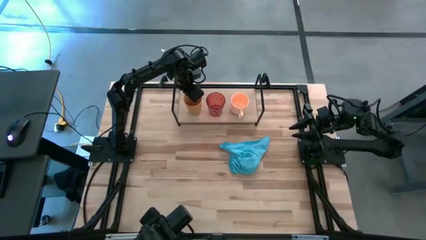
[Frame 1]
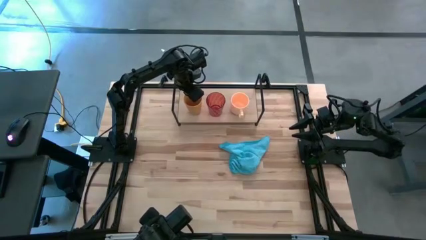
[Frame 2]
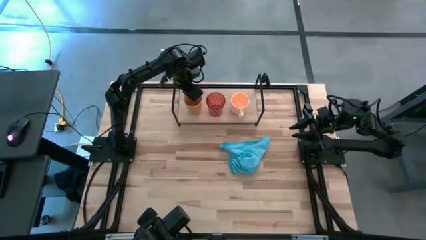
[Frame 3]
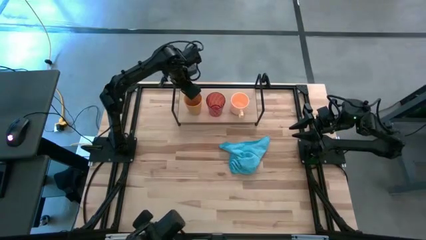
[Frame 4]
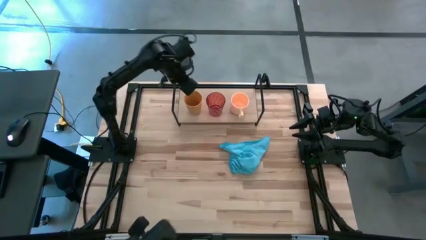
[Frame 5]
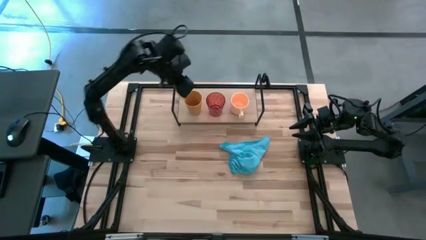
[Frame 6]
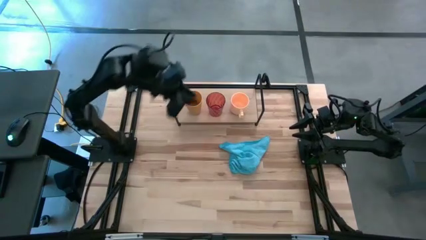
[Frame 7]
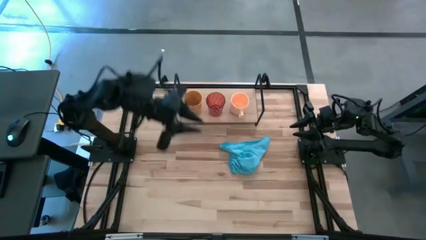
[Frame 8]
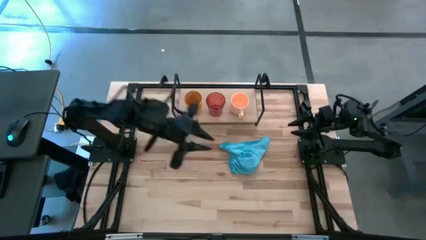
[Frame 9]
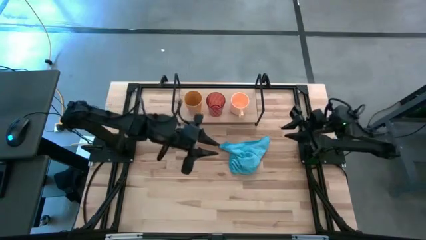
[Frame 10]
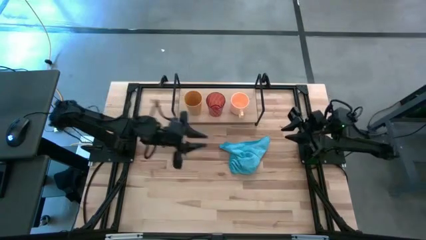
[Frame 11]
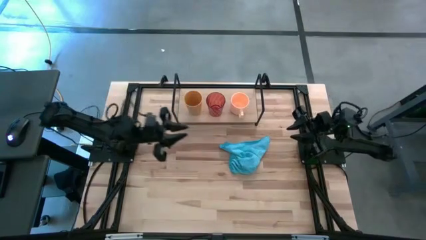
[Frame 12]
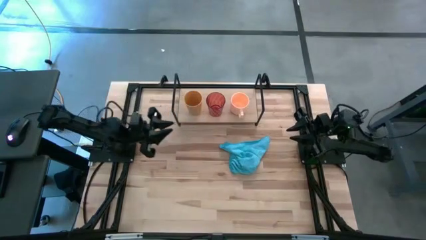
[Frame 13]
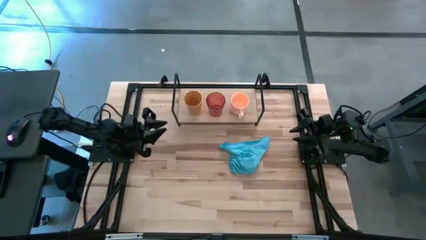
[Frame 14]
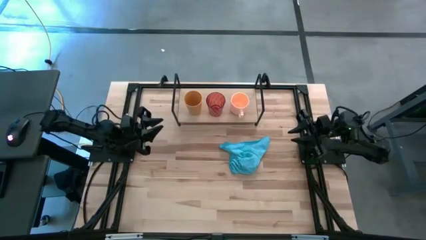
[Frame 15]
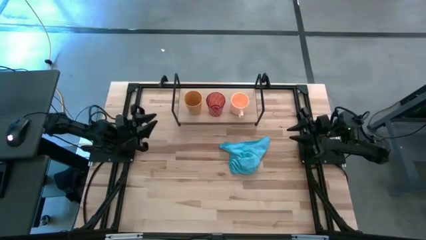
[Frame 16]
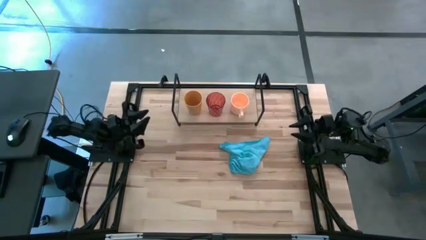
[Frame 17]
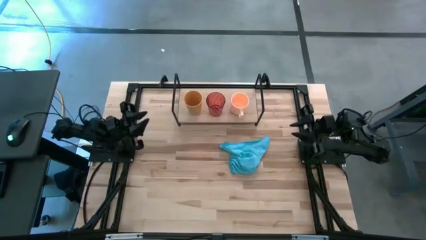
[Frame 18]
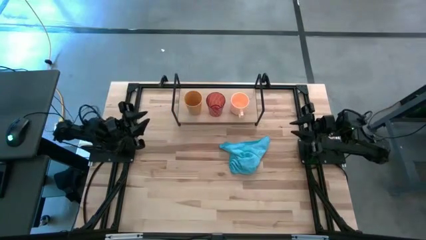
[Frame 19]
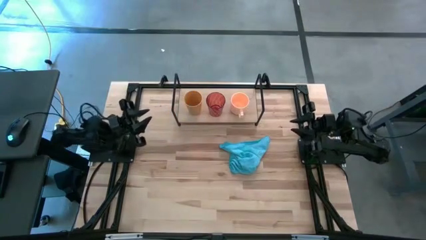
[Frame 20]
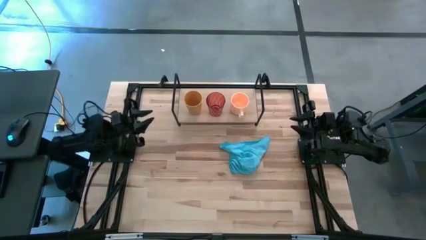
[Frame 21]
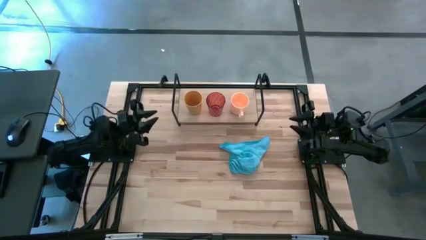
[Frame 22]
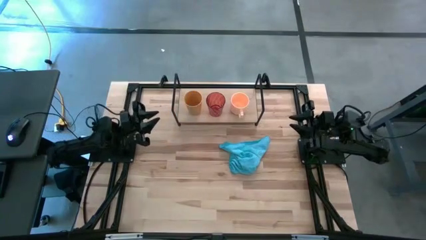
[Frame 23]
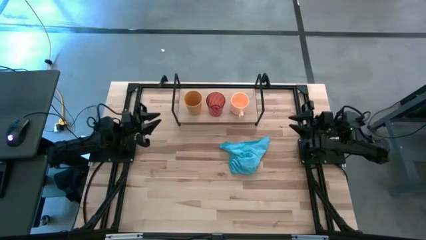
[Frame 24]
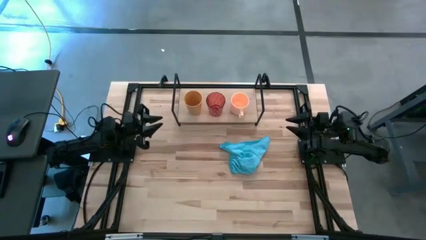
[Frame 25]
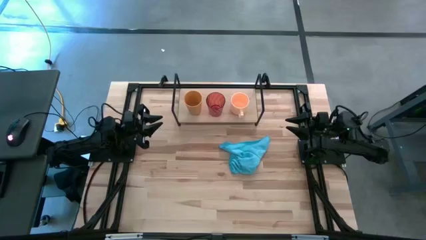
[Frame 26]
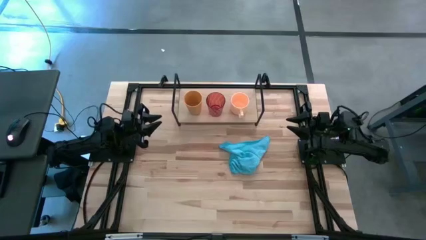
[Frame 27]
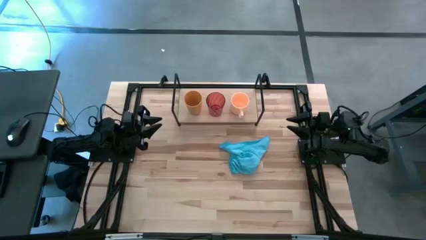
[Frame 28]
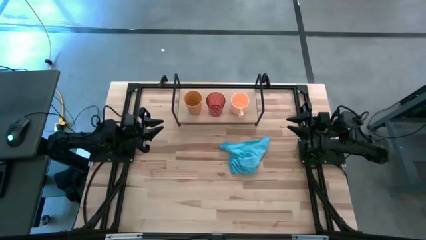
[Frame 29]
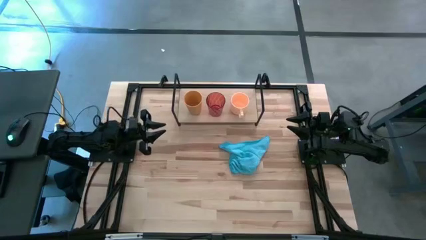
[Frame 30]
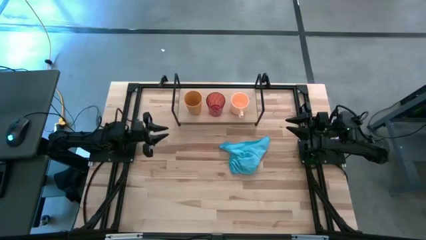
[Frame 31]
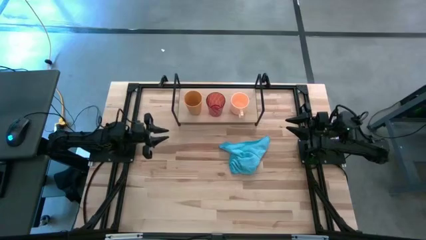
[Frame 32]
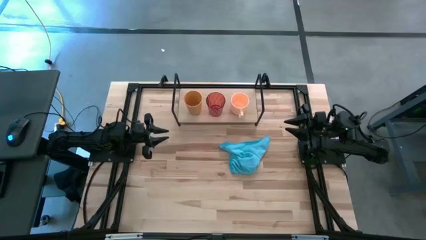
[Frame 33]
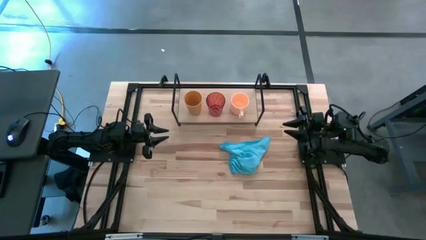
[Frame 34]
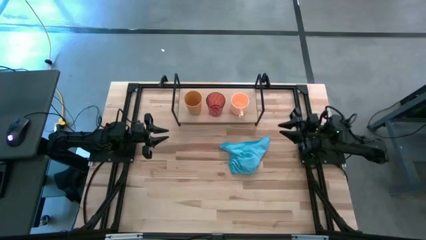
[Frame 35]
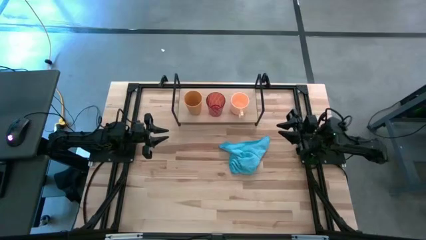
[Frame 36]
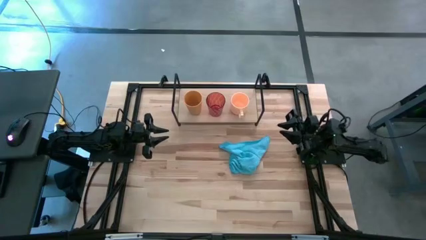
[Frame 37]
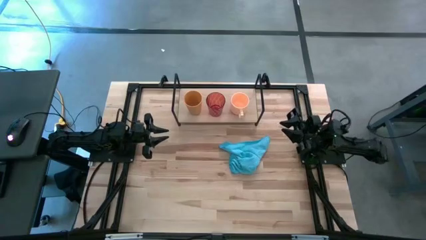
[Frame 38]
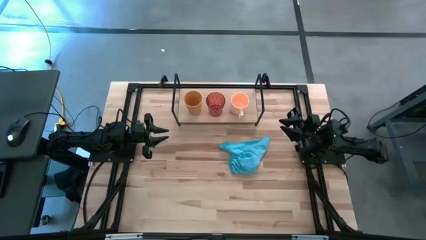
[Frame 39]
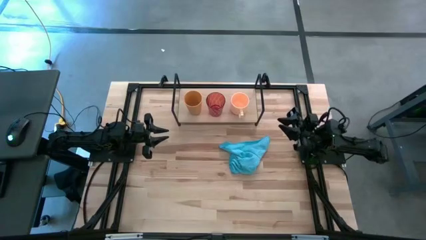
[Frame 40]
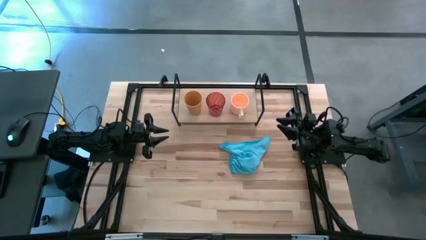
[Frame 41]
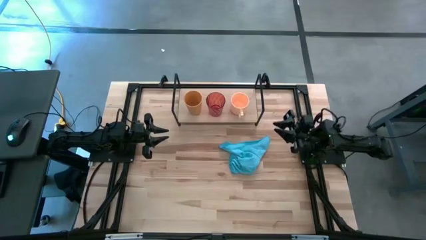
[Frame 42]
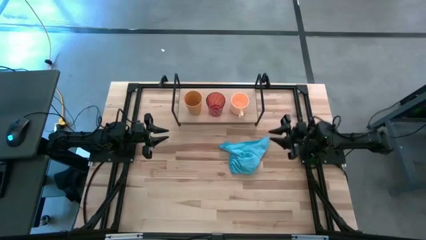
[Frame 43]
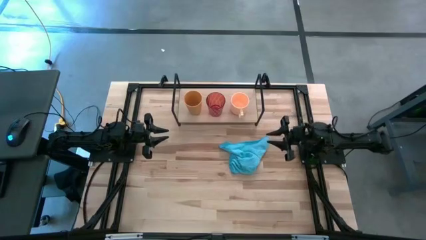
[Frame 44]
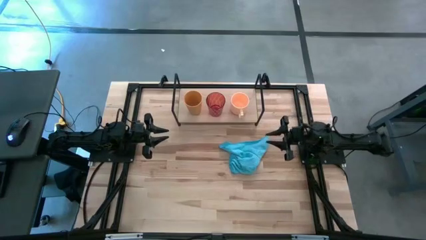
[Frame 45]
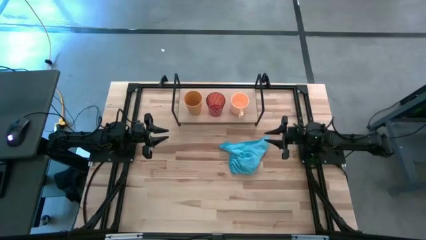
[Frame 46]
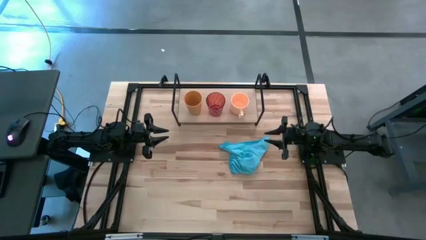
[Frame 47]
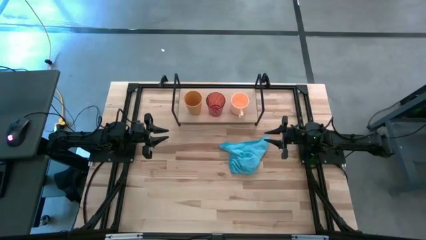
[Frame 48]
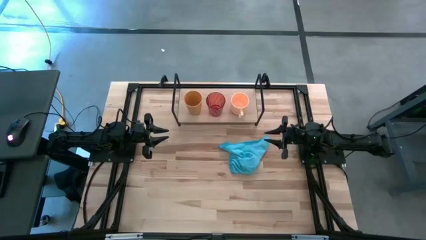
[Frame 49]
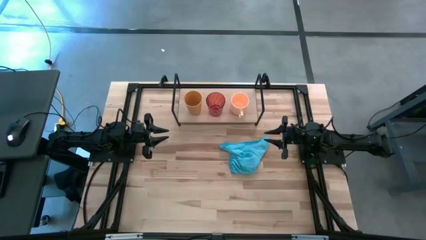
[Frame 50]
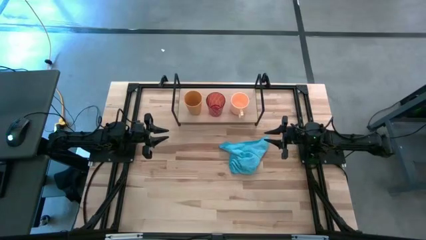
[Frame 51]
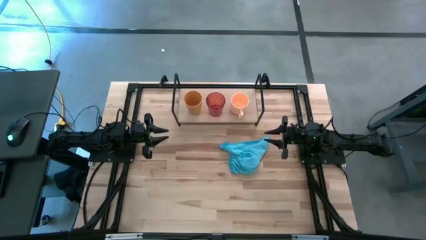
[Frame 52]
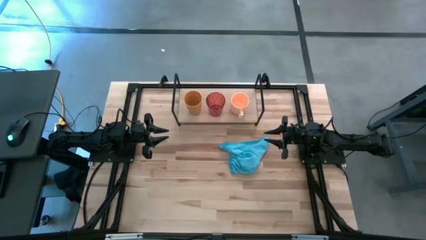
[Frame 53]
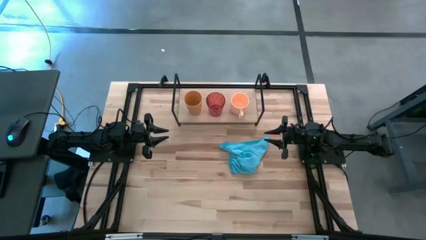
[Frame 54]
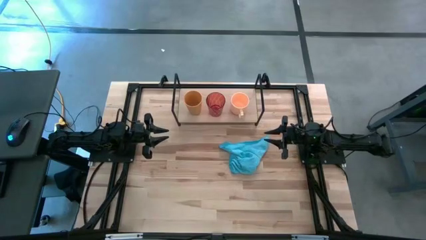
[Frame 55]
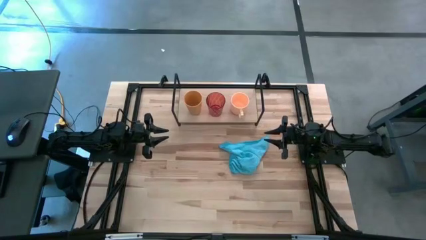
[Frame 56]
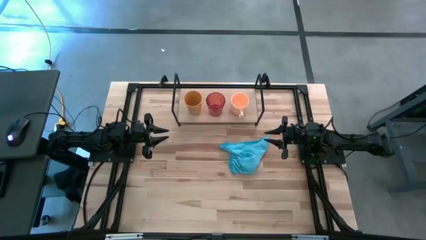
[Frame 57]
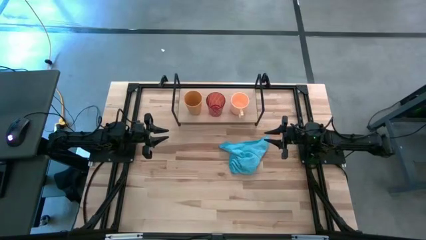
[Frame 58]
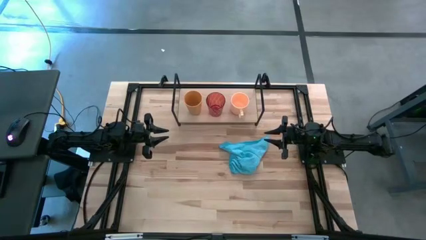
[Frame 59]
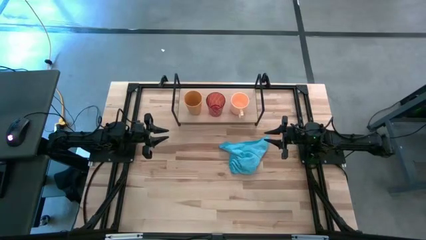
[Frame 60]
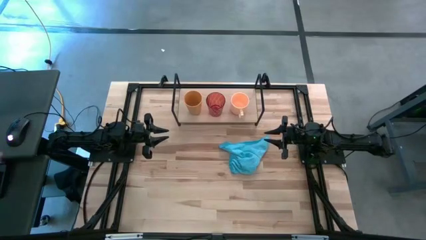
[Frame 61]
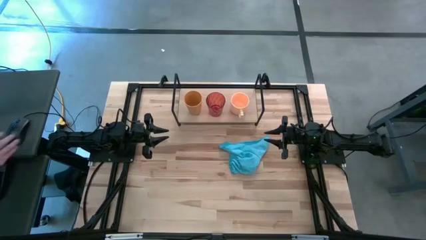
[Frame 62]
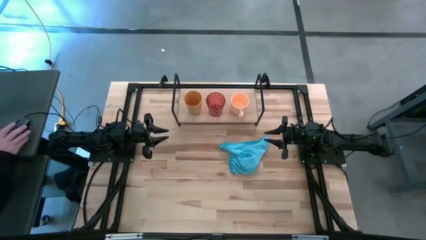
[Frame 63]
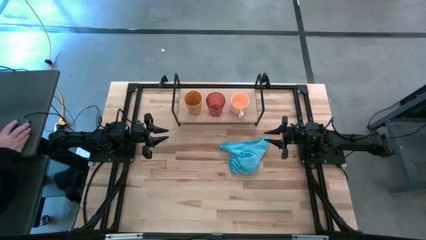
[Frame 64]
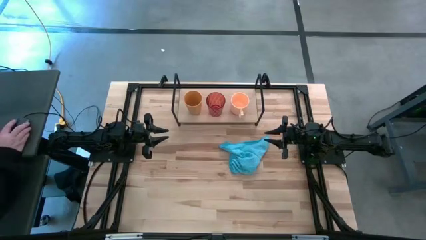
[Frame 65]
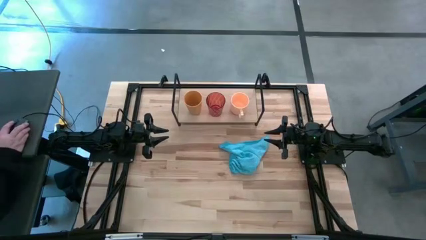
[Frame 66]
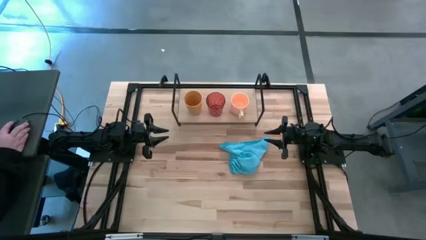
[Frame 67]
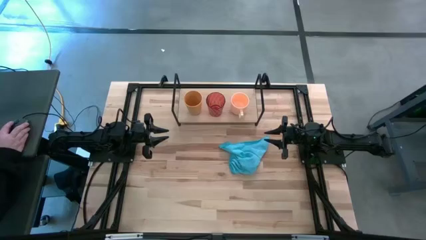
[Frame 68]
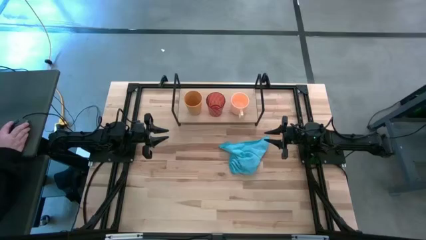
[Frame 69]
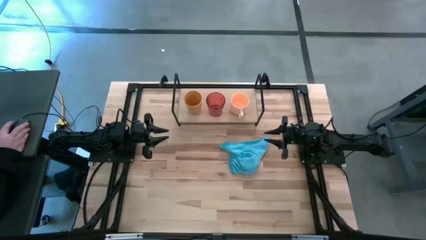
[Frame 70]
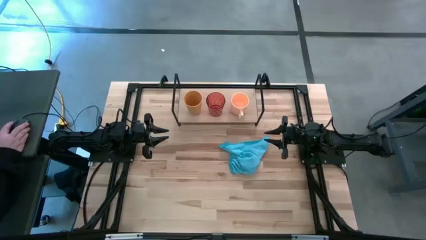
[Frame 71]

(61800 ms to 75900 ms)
Task: Stack small to large cups/mugs on shelf
Return to Home Position
